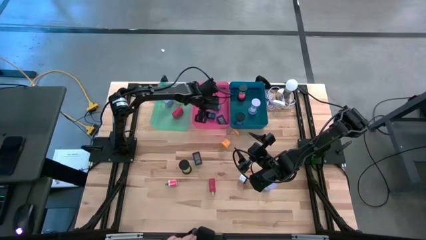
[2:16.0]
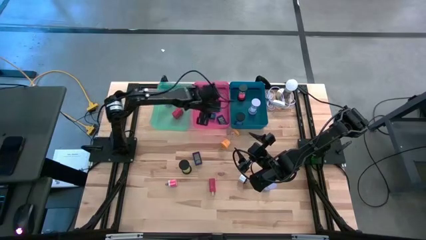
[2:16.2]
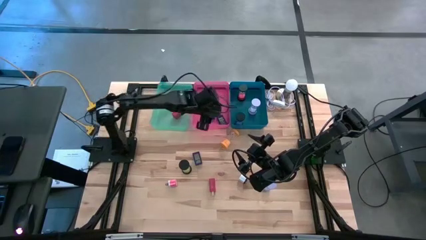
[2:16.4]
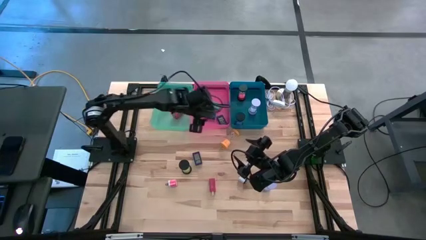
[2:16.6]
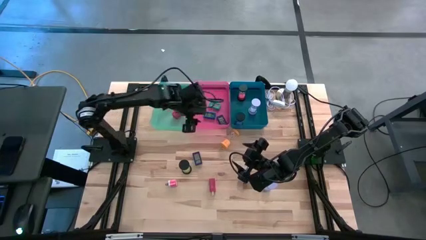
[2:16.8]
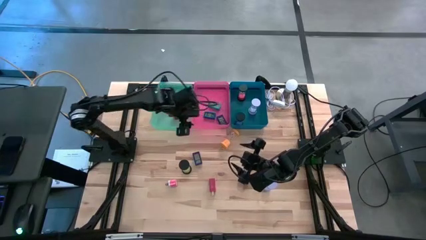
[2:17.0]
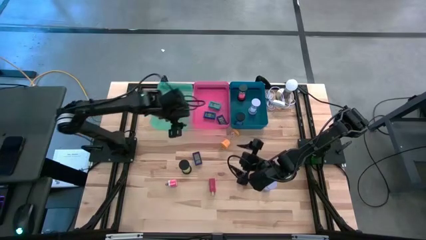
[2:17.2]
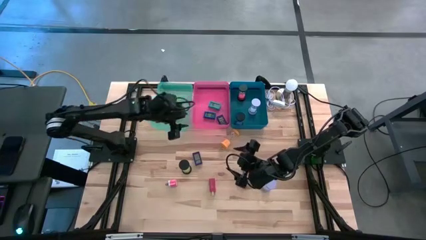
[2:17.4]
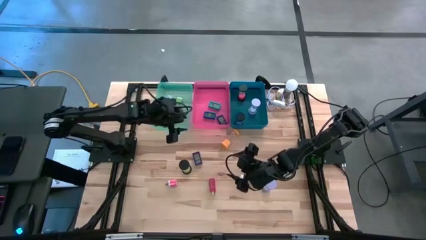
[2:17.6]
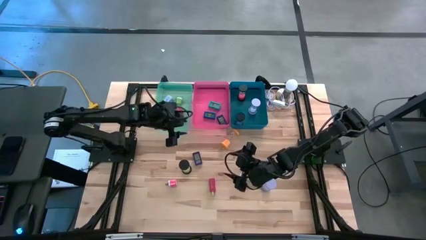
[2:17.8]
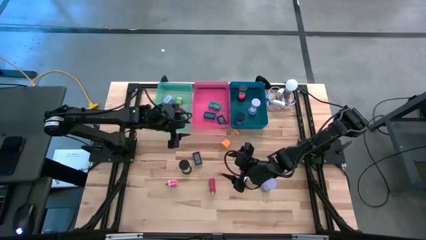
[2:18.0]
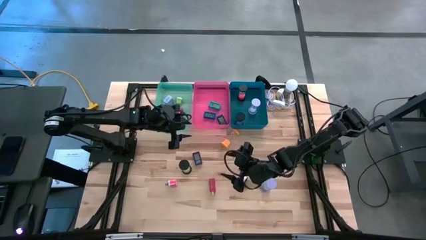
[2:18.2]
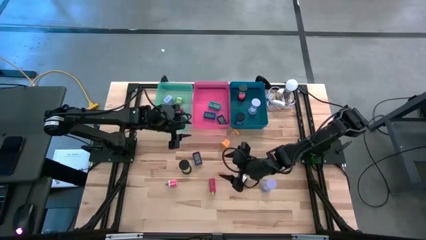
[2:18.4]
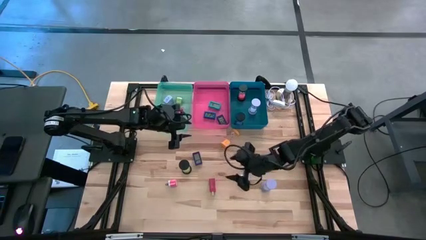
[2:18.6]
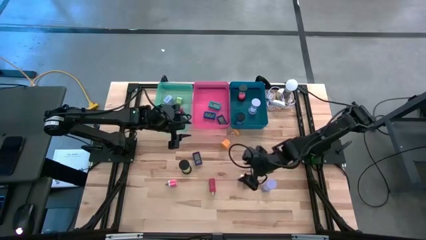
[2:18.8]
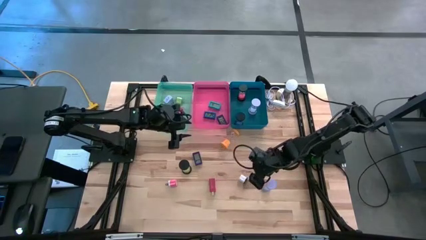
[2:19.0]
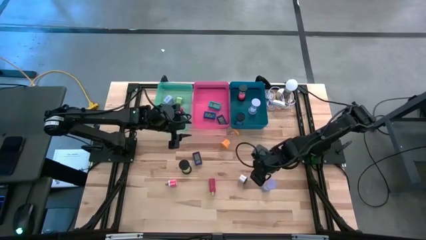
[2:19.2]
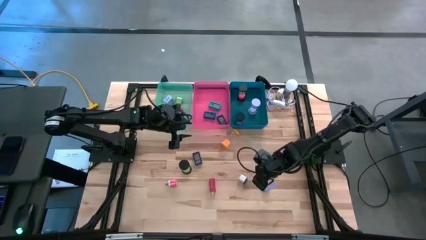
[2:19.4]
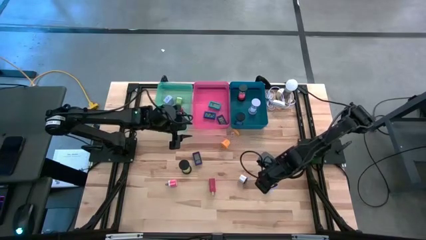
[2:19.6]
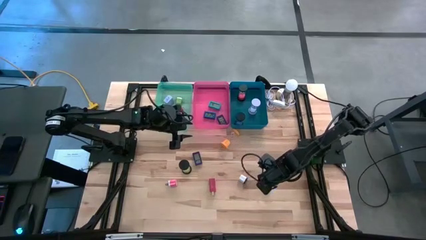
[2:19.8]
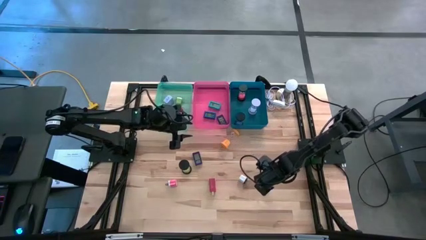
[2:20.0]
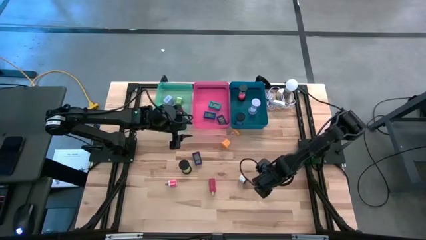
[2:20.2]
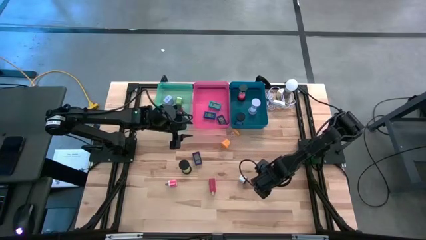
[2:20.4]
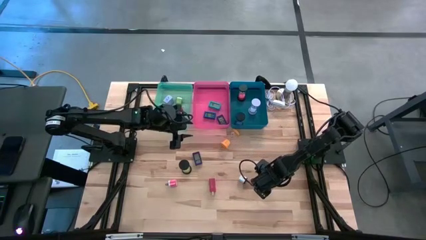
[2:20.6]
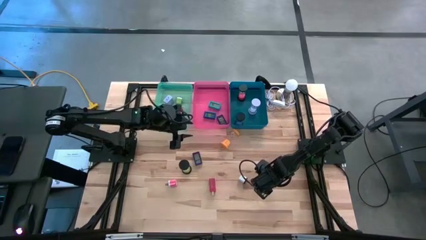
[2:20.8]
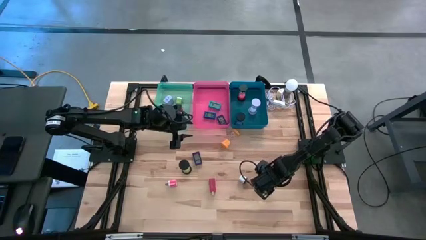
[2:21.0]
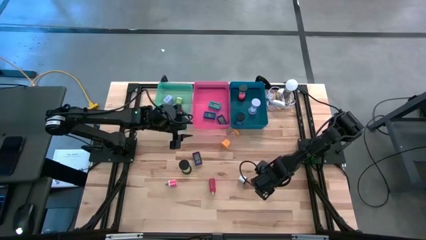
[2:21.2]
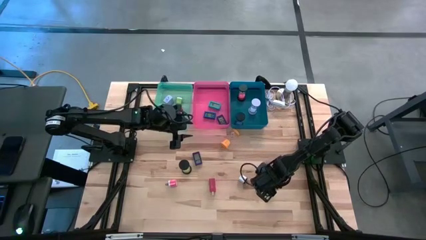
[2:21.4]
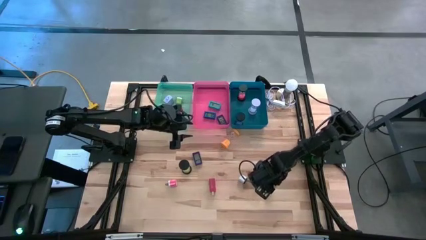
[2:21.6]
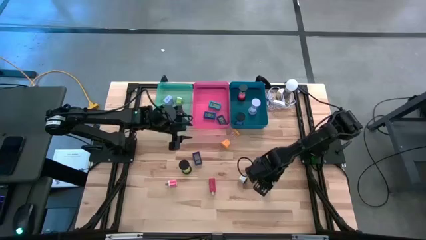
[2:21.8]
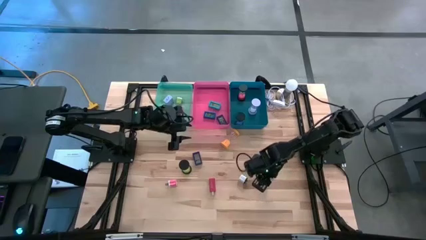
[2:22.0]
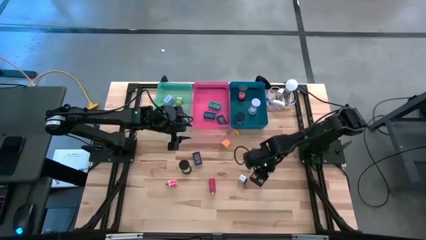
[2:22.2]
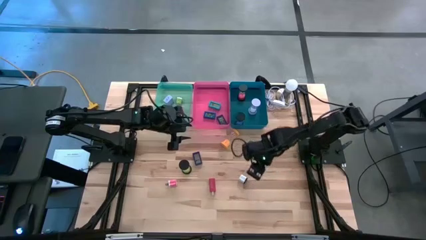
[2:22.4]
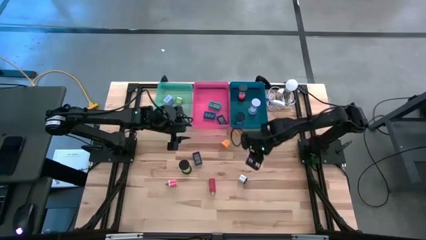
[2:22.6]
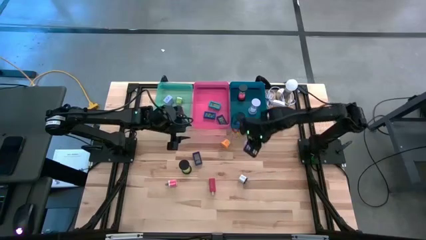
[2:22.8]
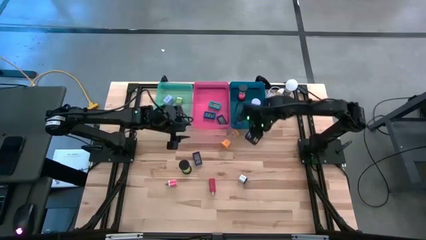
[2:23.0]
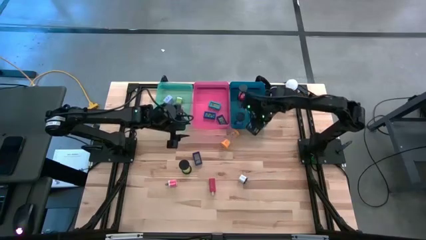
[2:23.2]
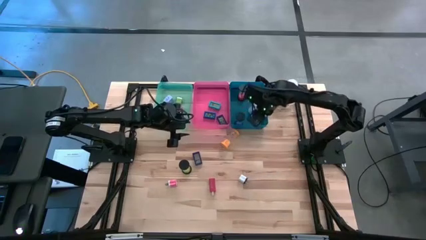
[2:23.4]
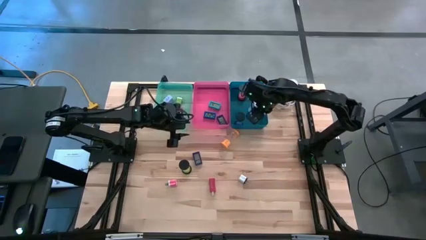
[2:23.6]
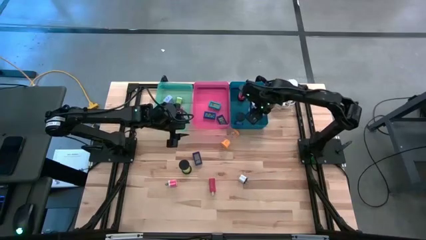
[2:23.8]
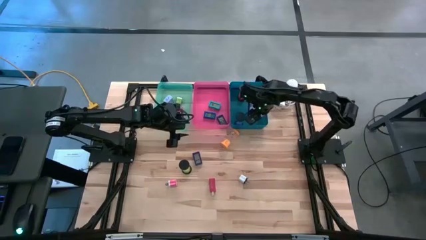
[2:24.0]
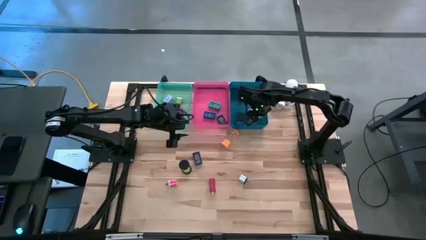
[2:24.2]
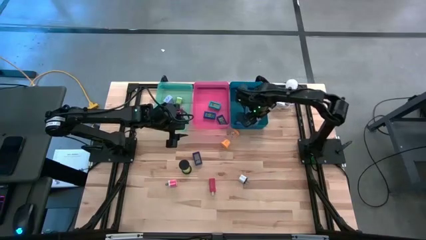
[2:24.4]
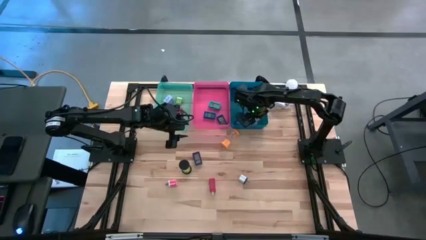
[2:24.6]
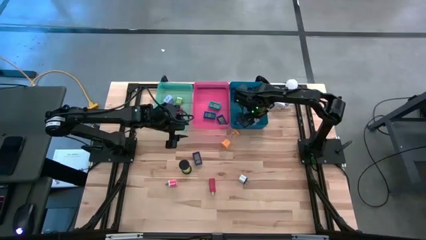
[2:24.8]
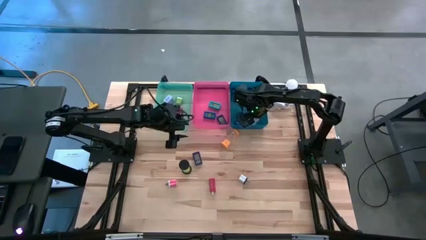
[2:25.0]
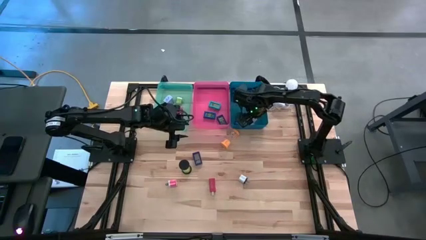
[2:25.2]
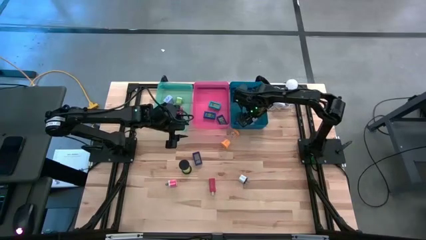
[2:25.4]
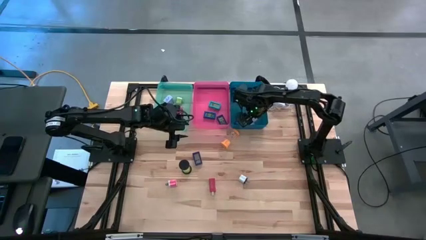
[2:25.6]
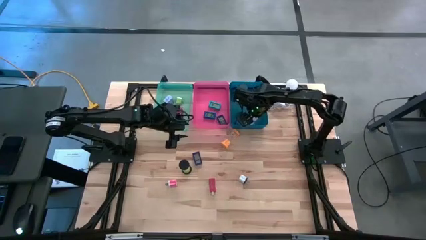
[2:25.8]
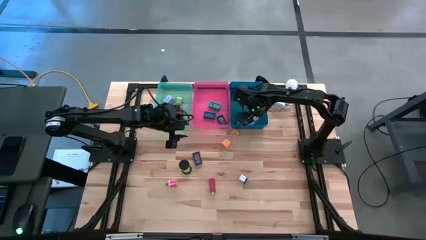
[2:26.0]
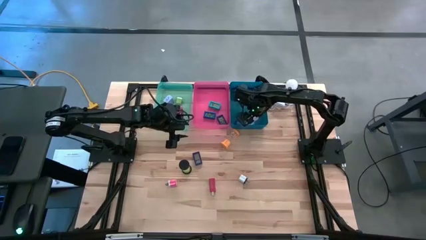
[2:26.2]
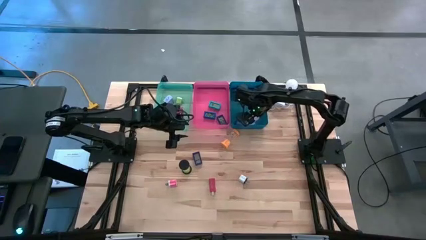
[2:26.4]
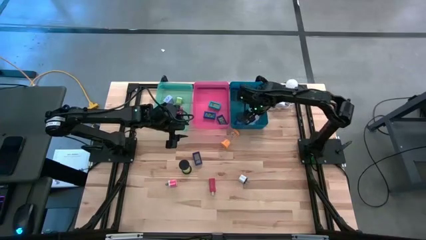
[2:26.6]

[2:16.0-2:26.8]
Task: Pick & Place Office items
Put the violet hourglass into the blue bin

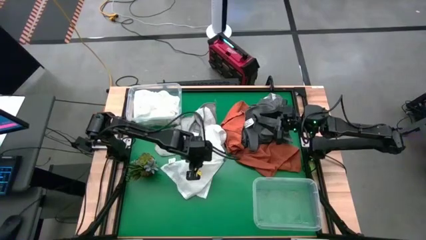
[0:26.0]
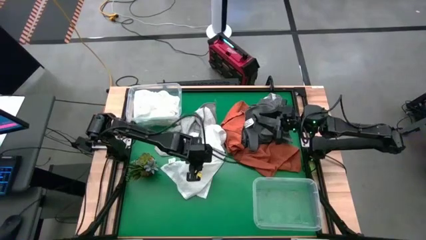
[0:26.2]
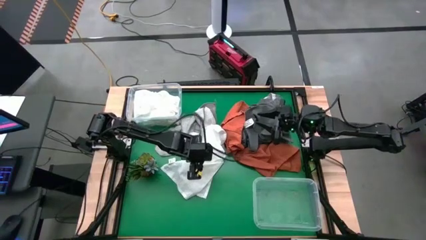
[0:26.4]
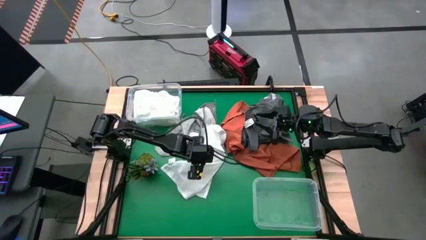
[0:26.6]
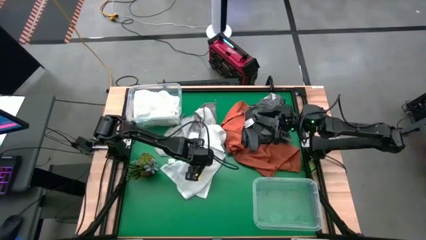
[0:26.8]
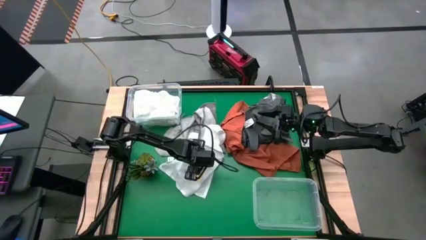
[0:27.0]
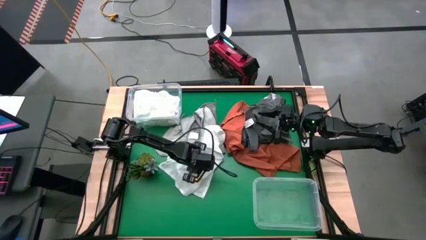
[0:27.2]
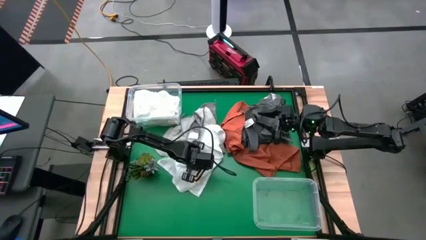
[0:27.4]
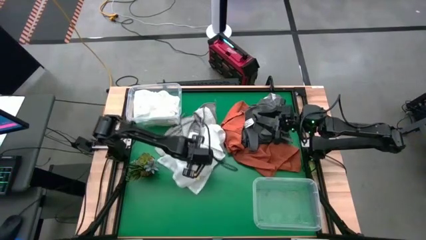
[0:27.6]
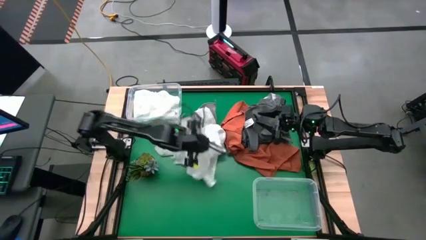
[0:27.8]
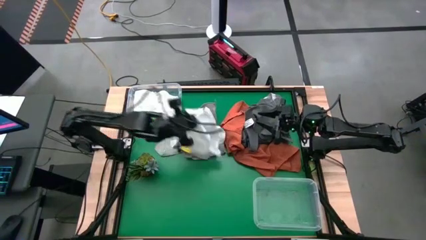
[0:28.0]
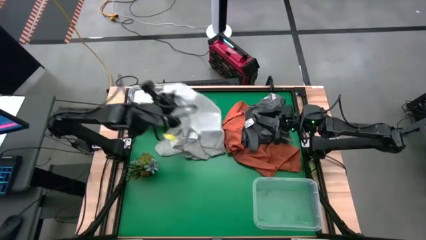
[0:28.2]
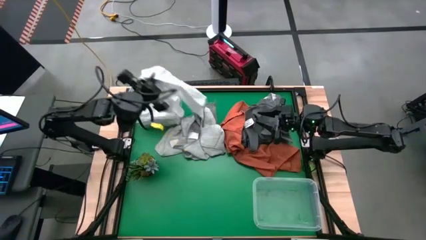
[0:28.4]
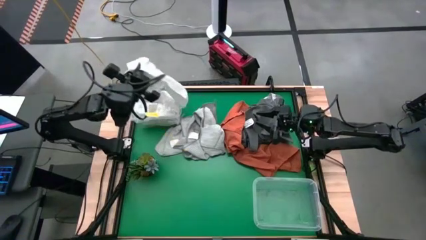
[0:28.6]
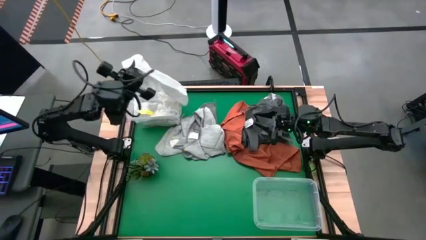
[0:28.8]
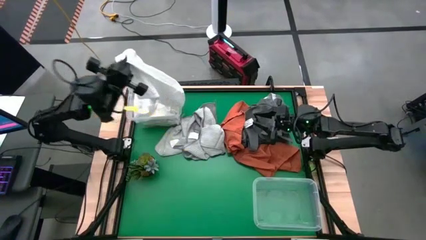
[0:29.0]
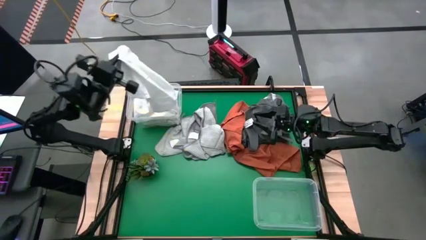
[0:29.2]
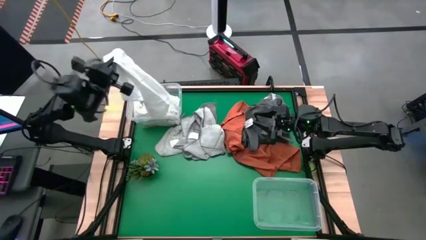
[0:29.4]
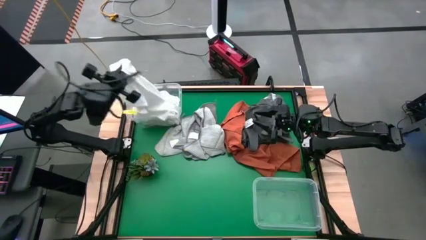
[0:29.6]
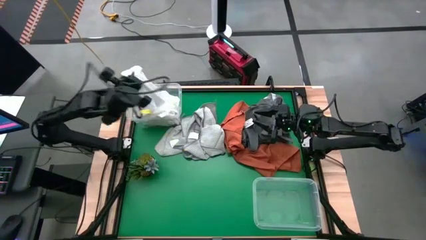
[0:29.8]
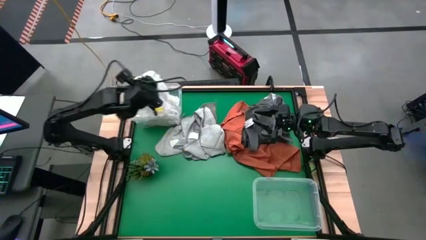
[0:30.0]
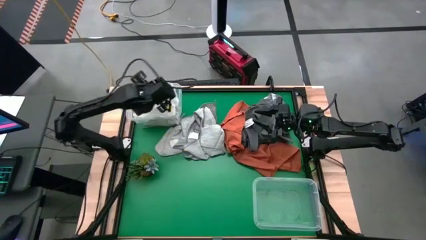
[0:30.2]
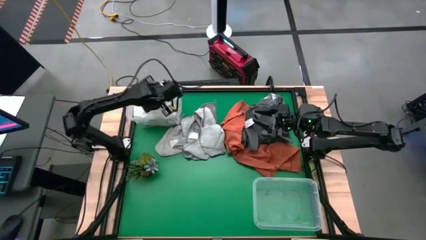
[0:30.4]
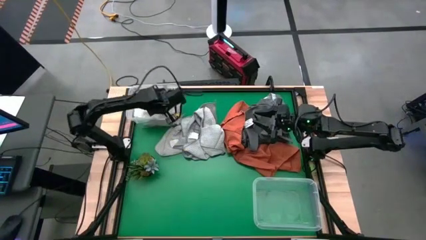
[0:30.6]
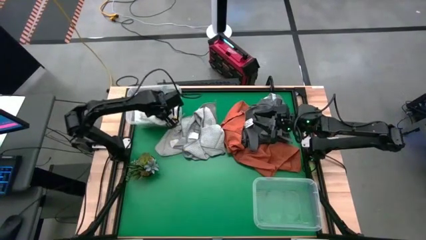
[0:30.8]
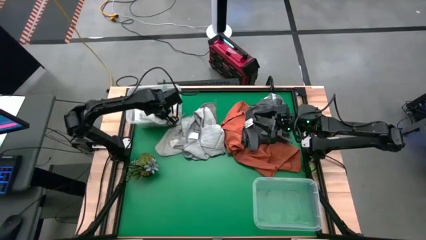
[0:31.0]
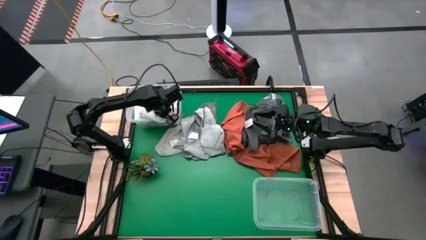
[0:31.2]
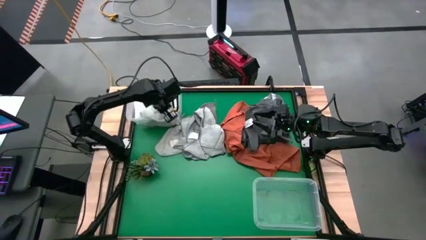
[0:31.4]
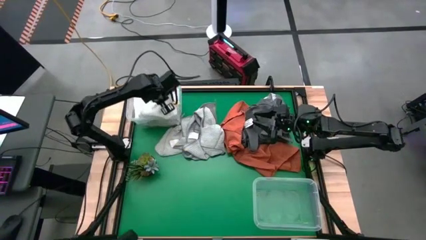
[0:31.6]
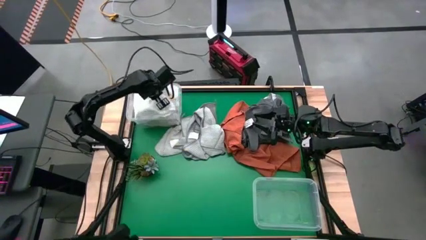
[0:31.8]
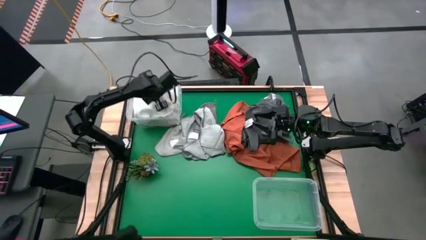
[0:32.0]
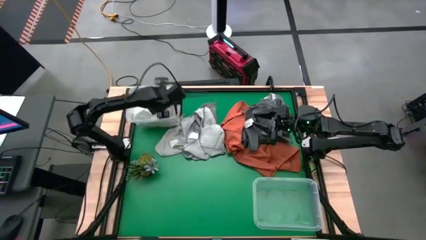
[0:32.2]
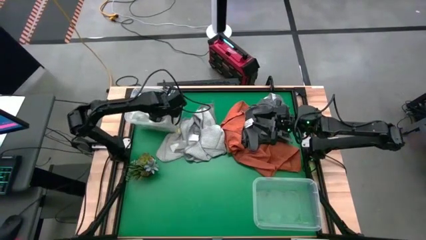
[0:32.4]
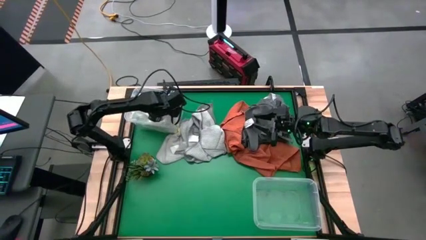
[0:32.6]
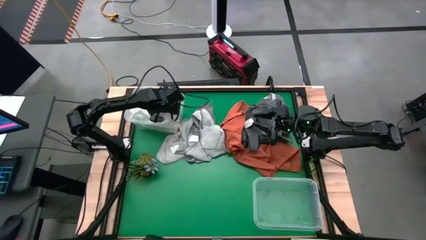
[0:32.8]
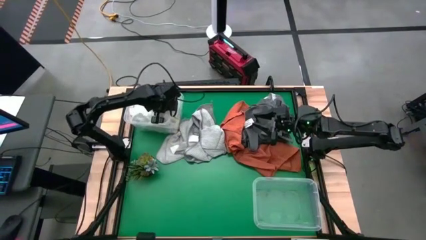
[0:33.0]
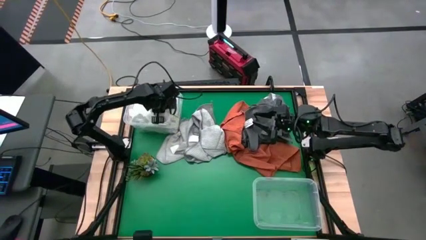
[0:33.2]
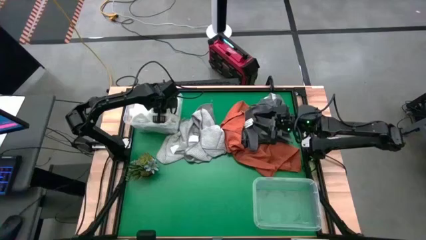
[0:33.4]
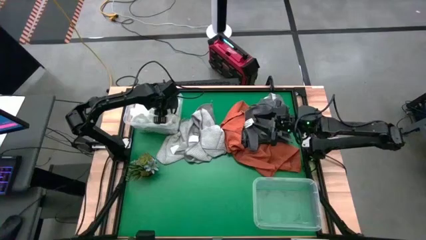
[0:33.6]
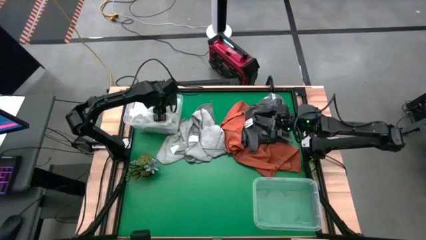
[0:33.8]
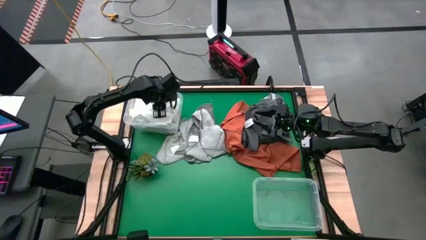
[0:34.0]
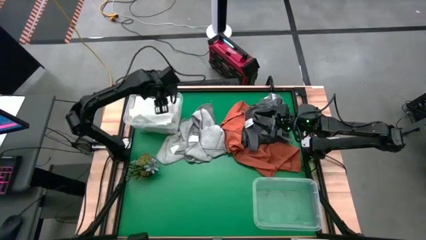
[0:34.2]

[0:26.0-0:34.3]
Task: Sort towels by color in basket
Put the white towel into the top transparent bin
